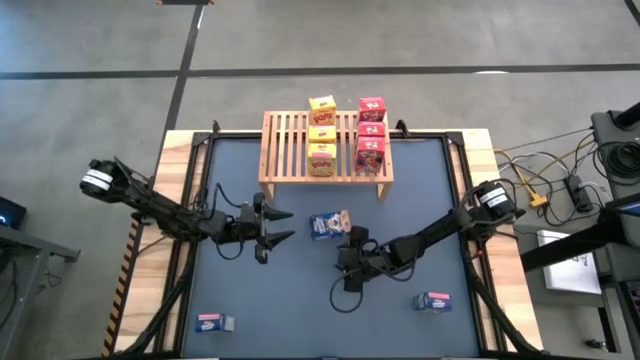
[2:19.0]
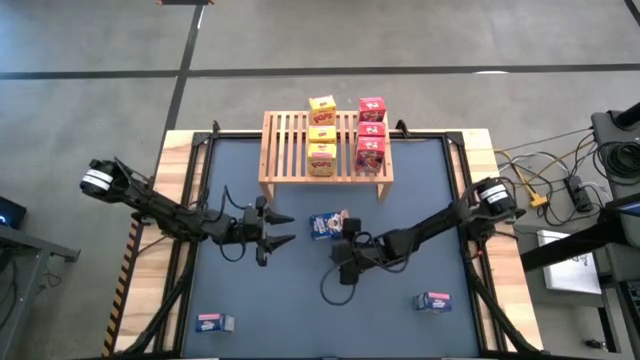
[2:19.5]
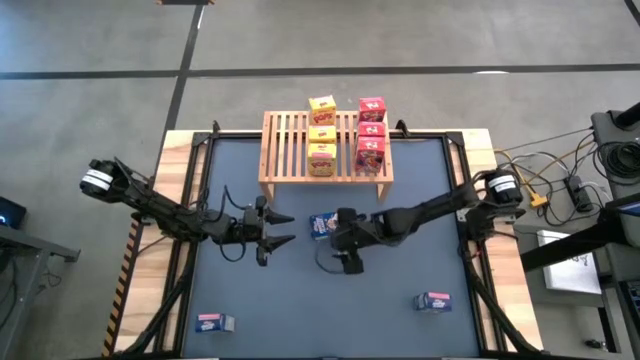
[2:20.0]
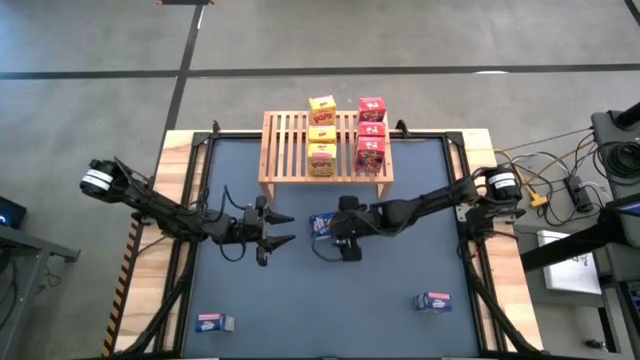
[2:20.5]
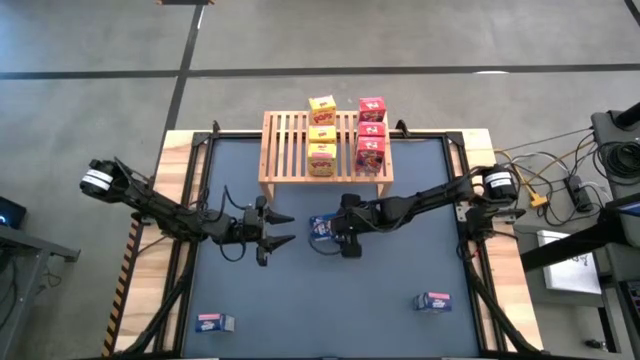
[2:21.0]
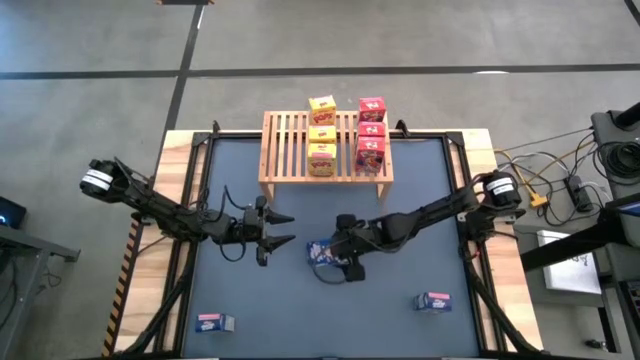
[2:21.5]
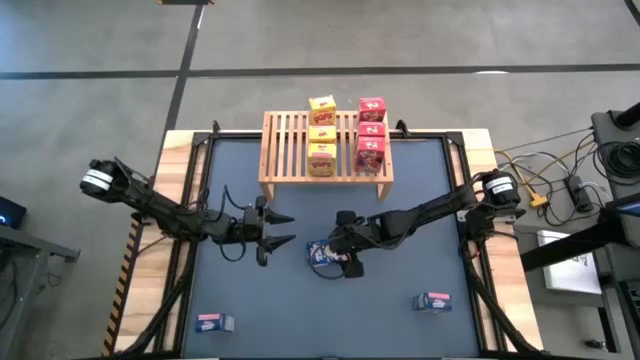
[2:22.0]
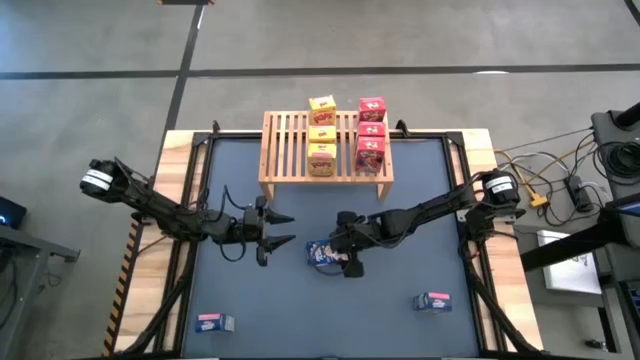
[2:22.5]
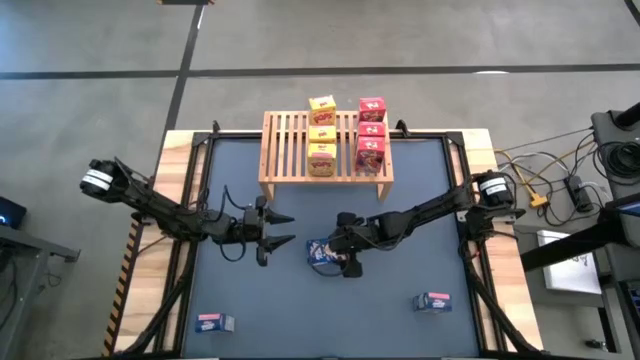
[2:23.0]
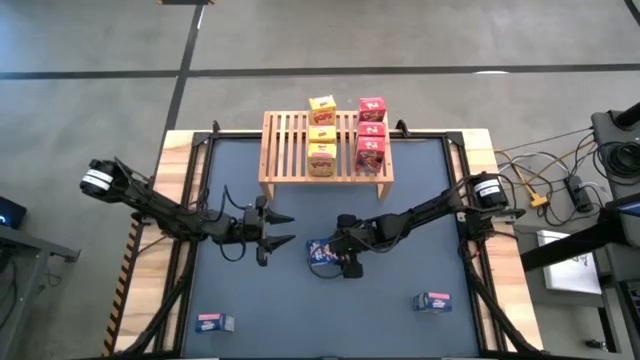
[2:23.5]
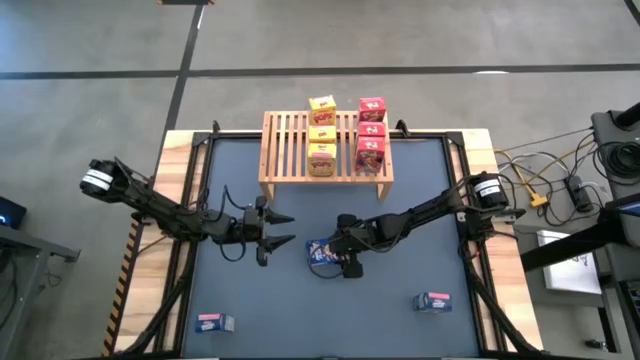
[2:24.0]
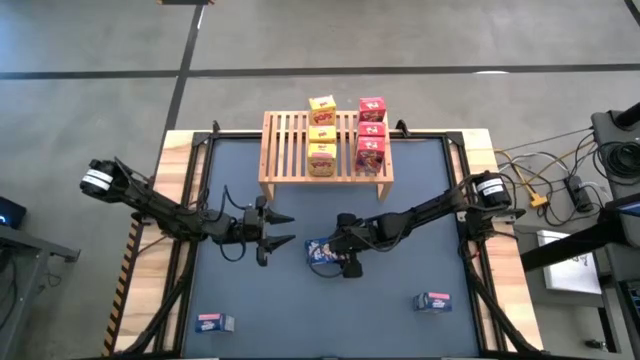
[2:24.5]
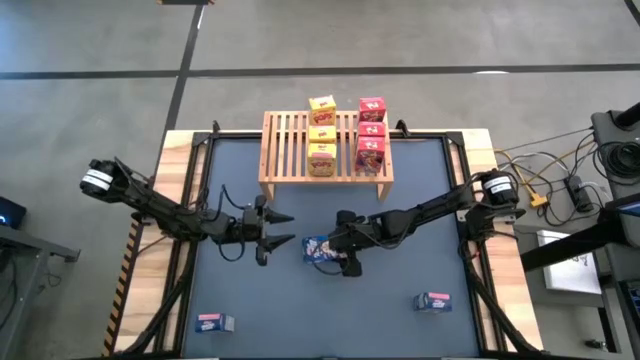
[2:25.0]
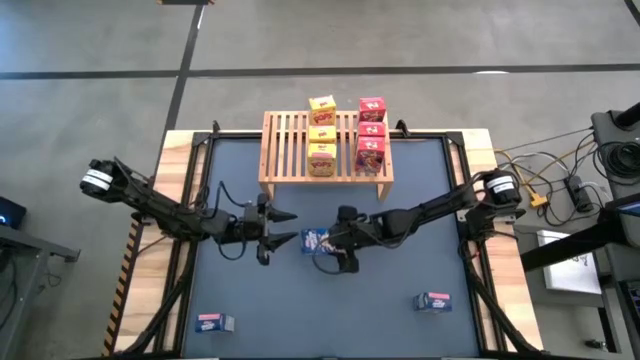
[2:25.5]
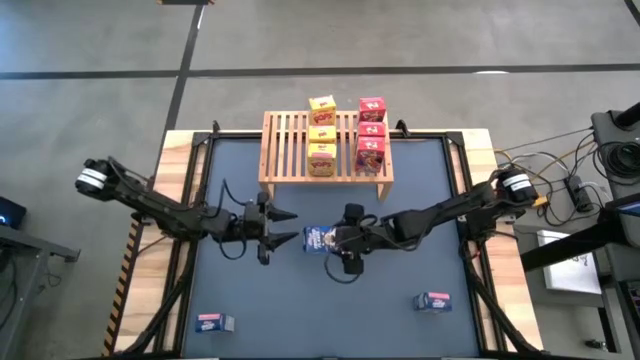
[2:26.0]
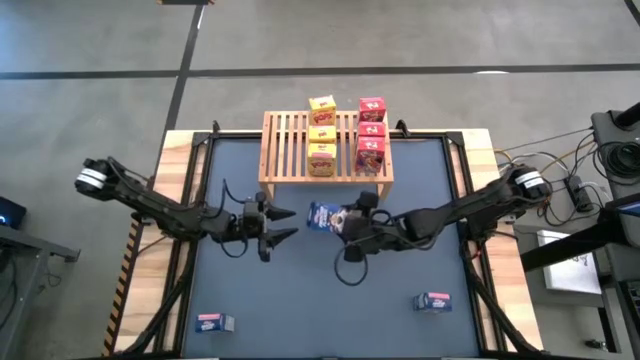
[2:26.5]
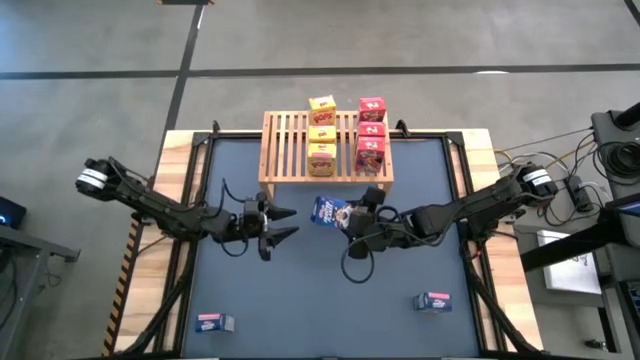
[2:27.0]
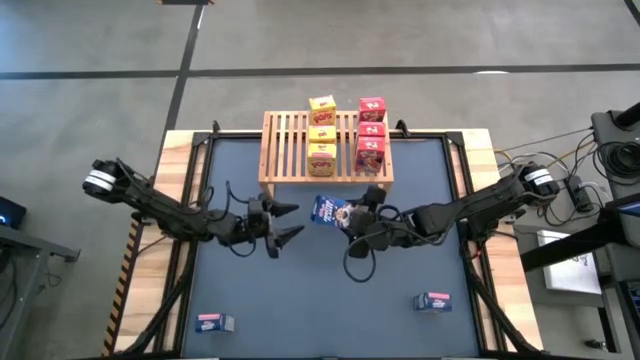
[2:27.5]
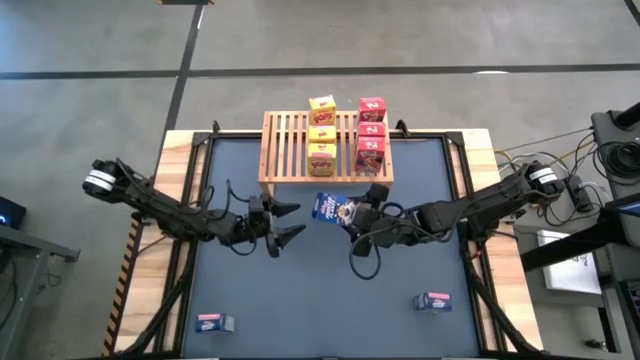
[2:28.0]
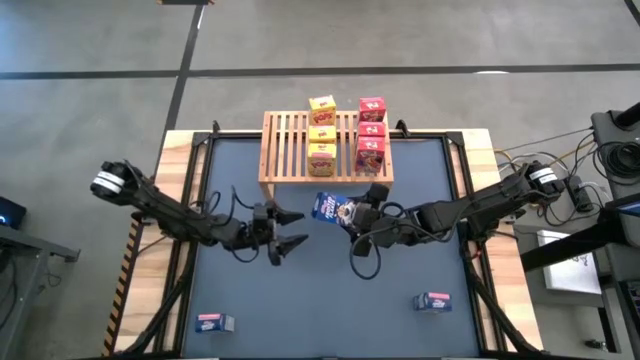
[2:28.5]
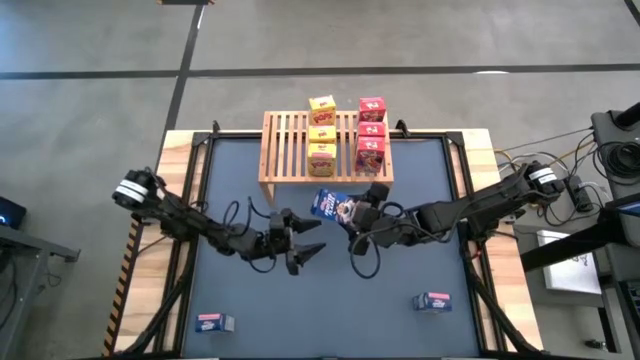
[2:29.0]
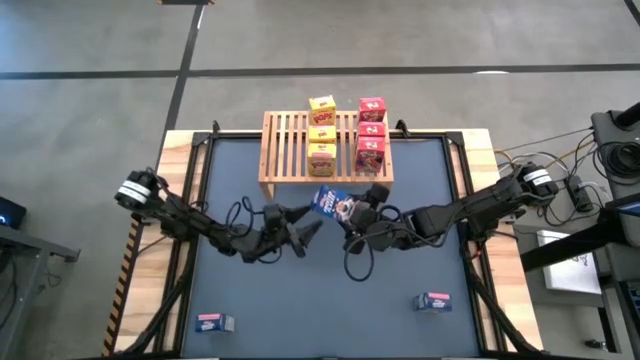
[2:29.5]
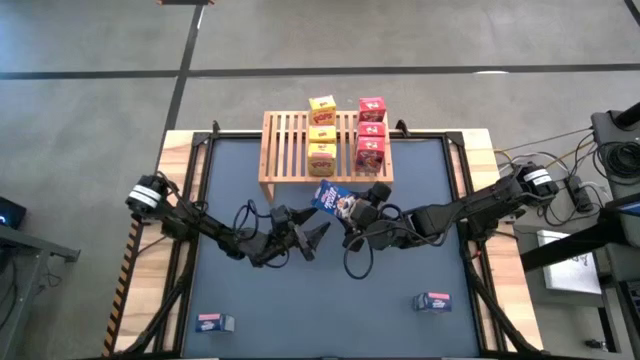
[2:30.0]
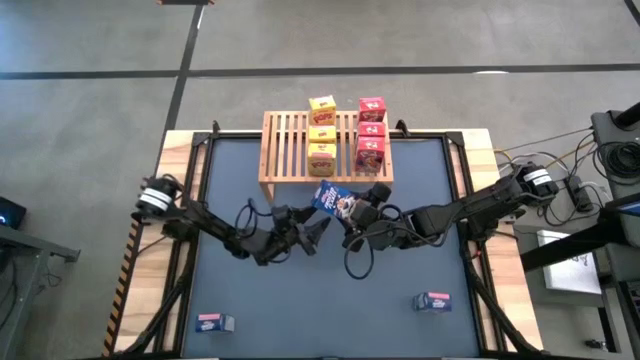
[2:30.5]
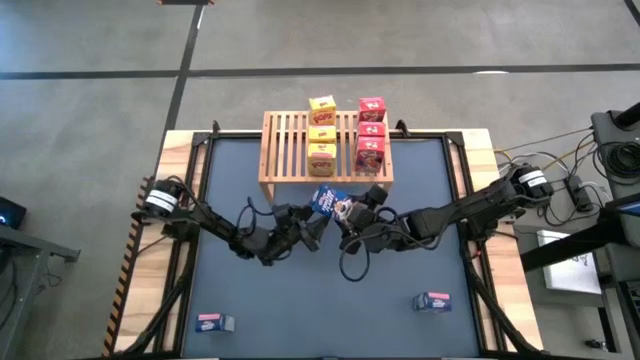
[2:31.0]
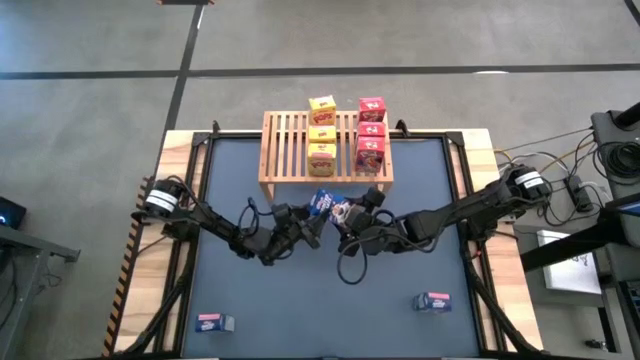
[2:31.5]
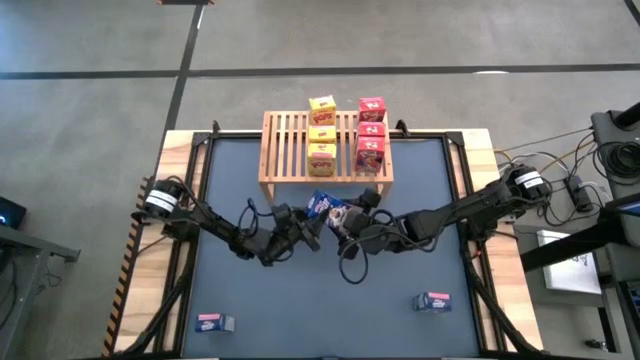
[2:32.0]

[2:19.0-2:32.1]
Task: Stack cereal on shelf
Put the top blue cereal box on the shelf

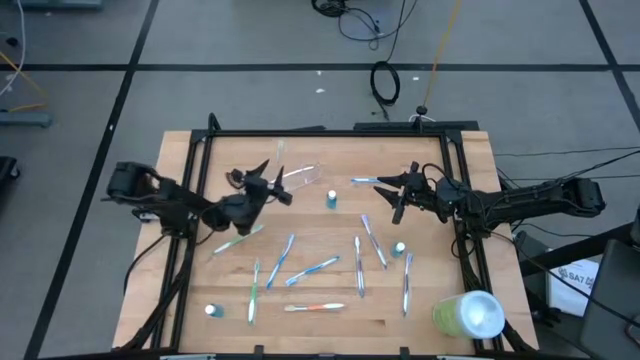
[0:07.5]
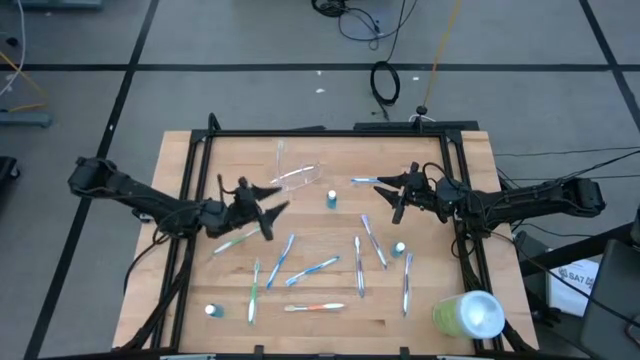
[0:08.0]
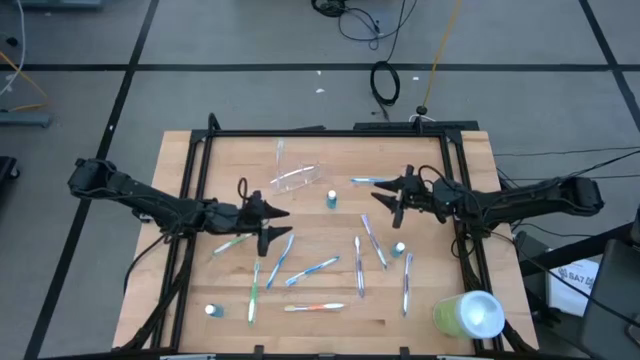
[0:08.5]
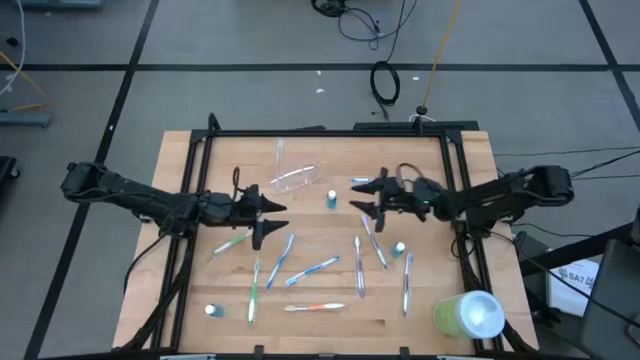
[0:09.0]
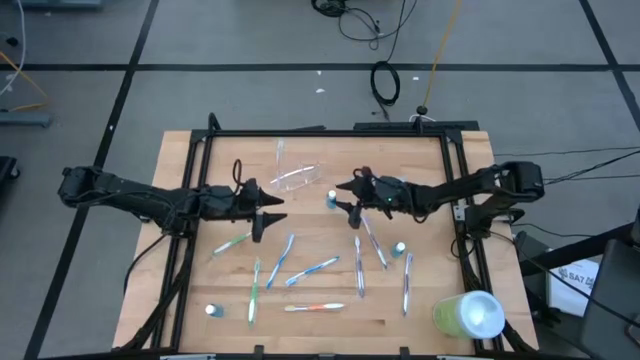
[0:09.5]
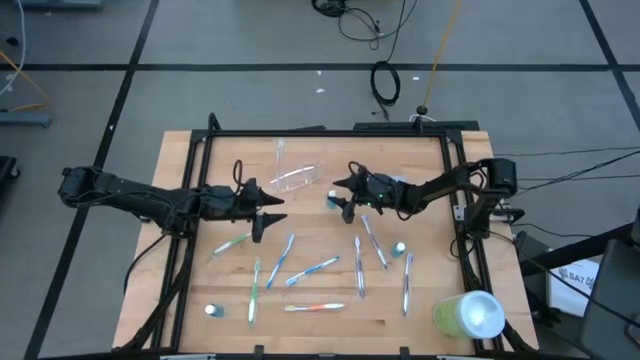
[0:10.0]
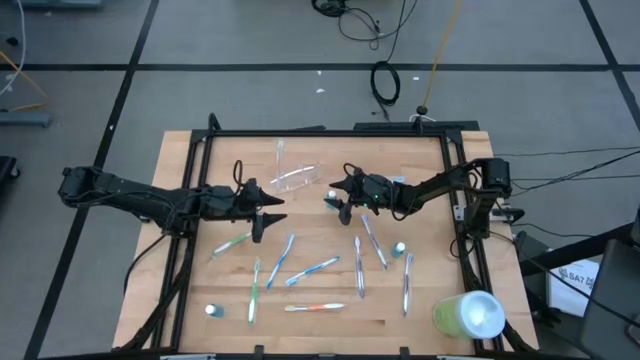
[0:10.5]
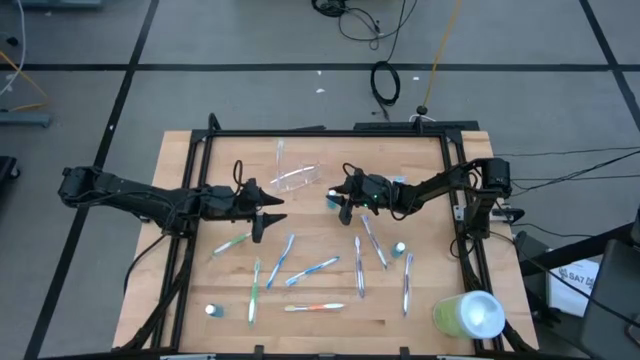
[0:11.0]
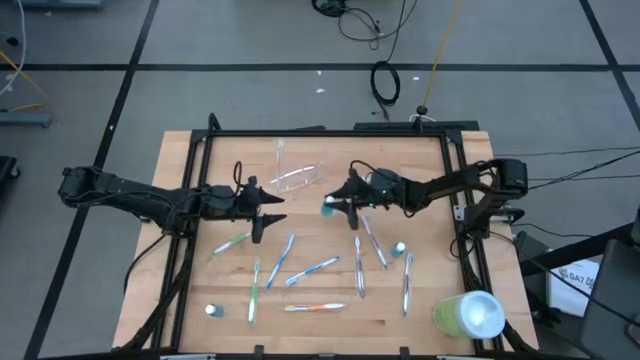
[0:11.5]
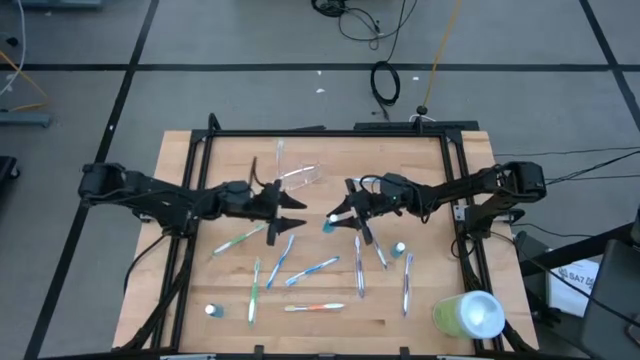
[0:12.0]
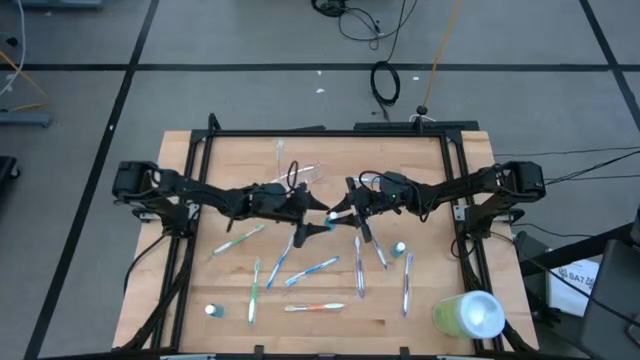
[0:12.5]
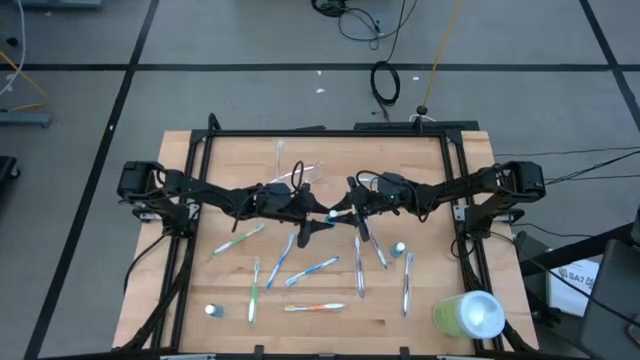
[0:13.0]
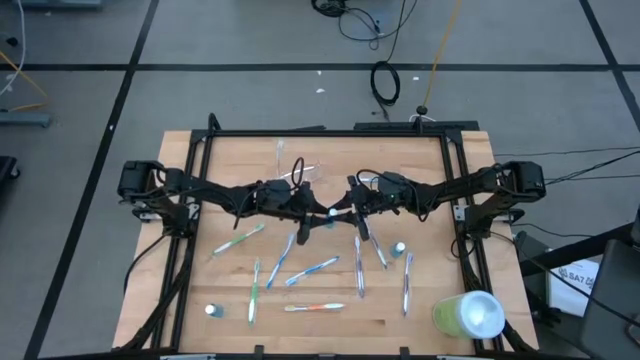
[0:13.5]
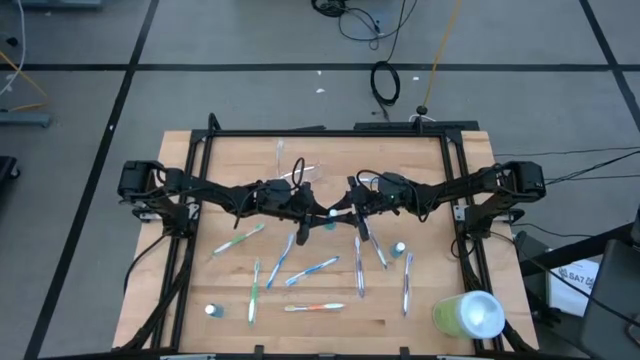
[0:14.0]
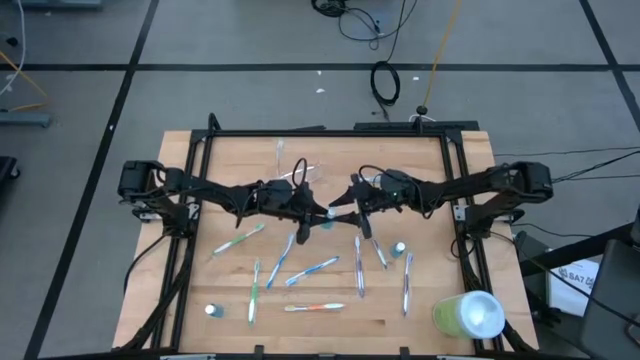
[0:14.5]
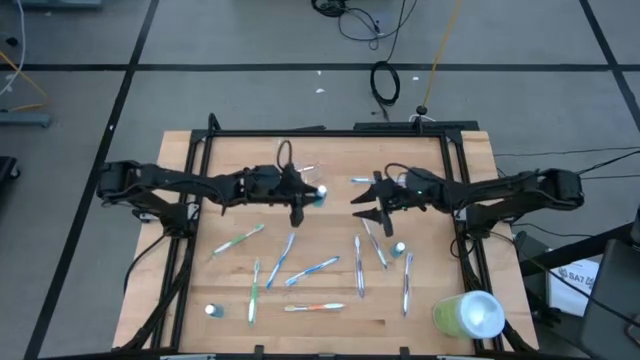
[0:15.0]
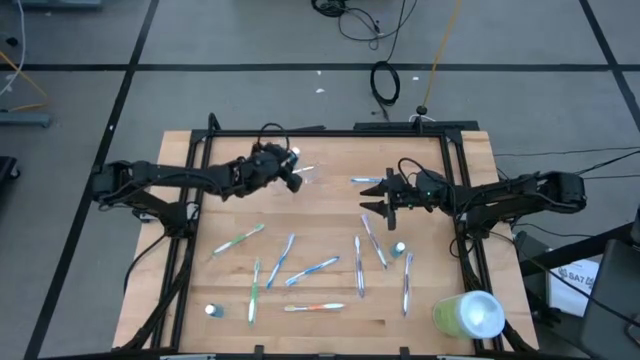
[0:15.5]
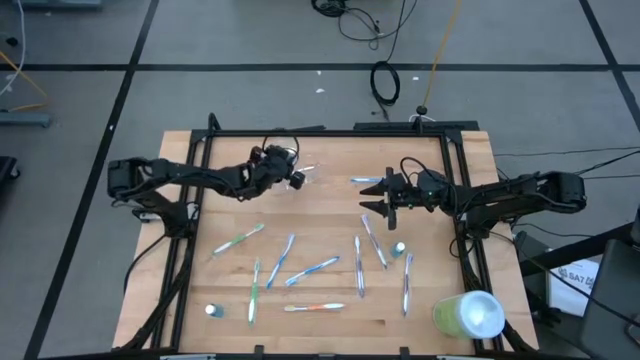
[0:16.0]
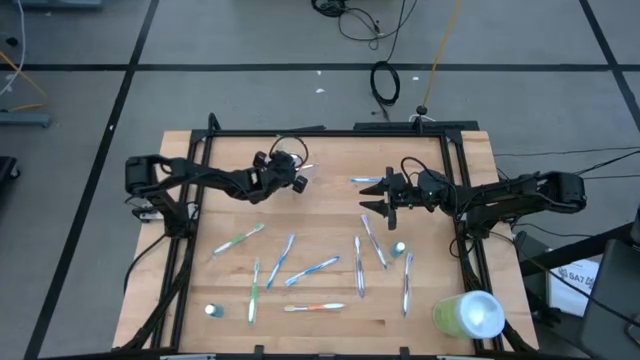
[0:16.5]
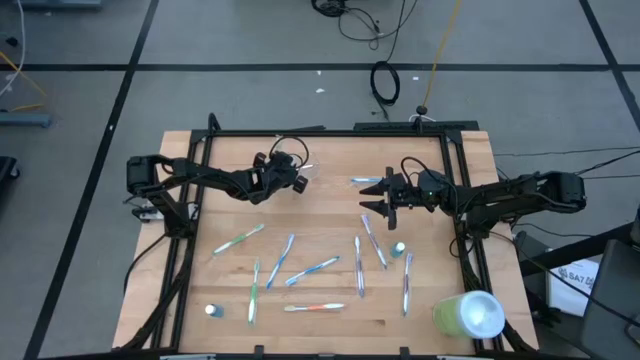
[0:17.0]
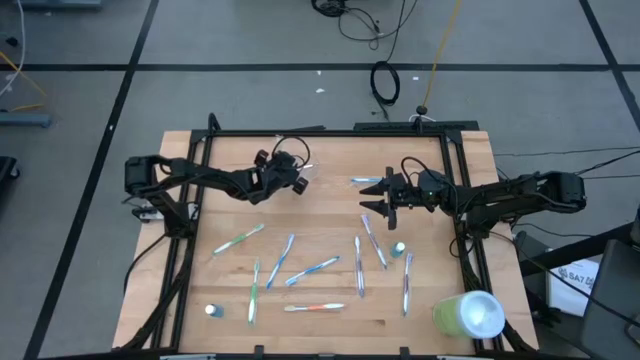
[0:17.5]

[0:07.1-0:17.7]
Task: Pick & Place toothbrushing station
Put the top mouthwash into the transparent organizer
